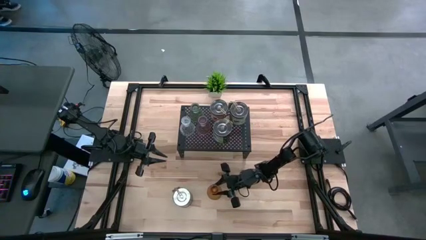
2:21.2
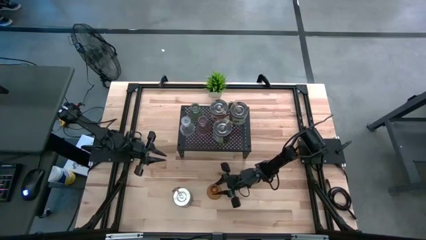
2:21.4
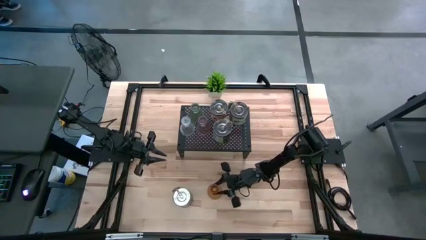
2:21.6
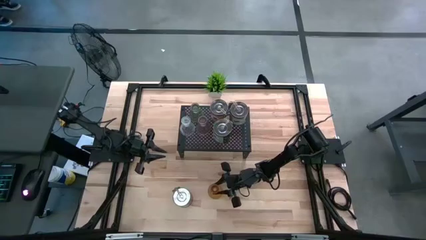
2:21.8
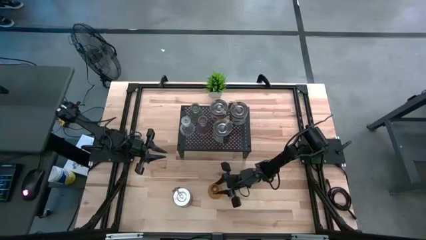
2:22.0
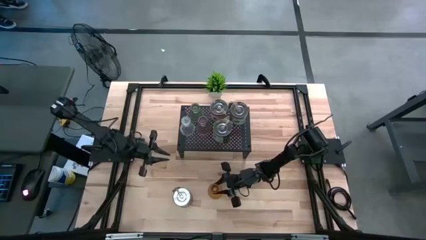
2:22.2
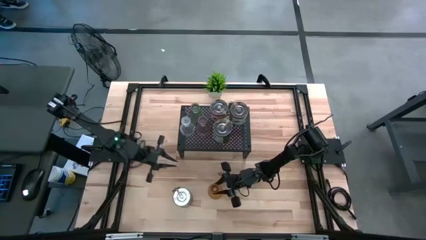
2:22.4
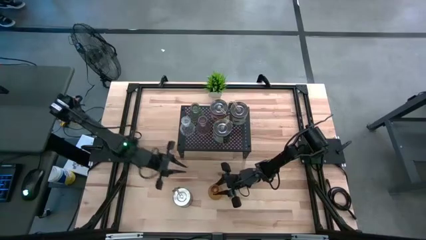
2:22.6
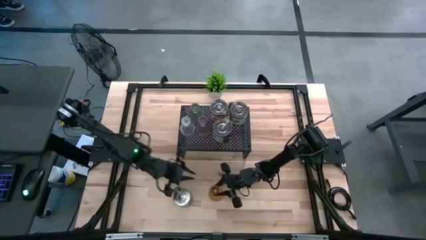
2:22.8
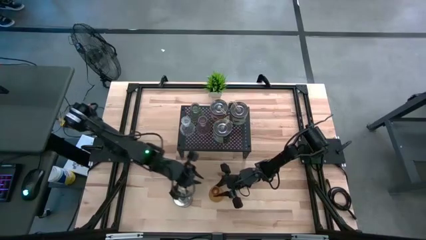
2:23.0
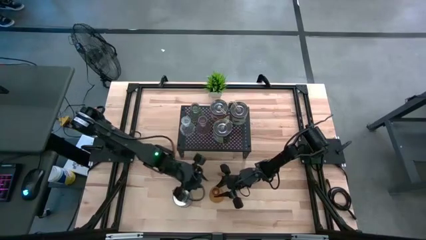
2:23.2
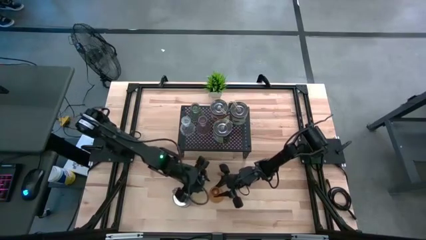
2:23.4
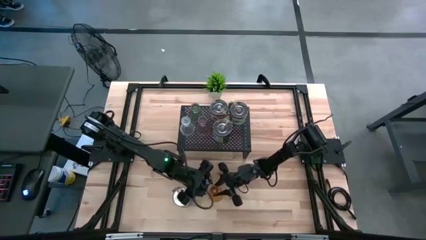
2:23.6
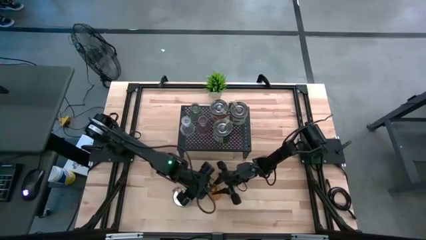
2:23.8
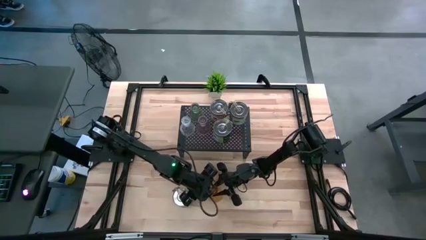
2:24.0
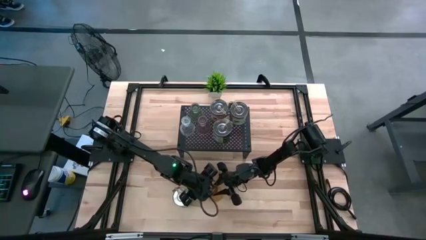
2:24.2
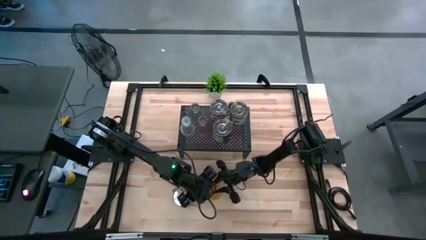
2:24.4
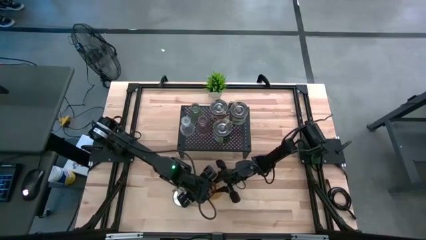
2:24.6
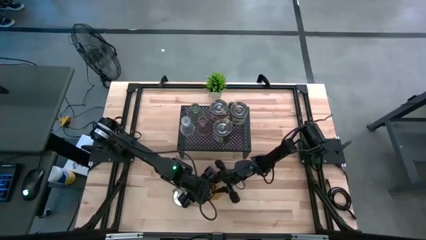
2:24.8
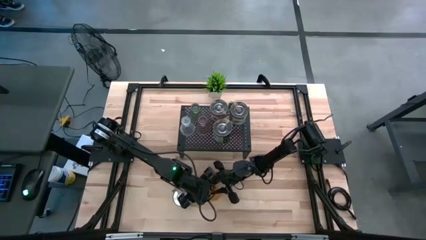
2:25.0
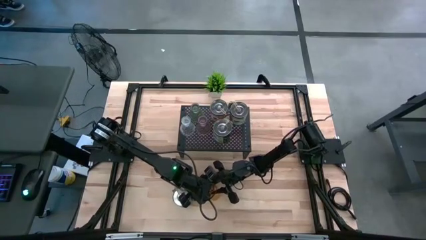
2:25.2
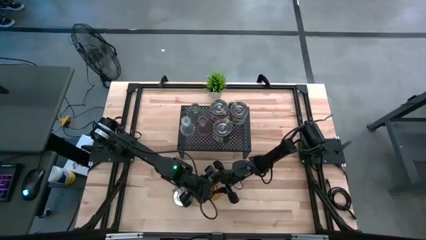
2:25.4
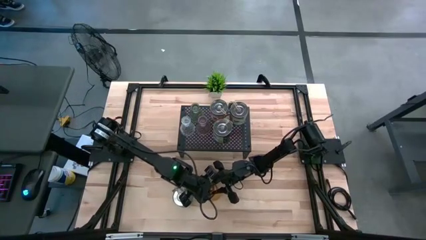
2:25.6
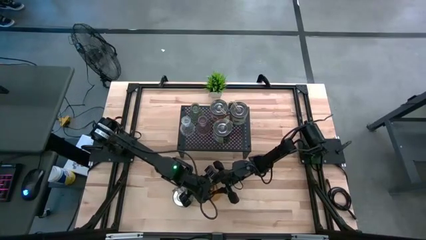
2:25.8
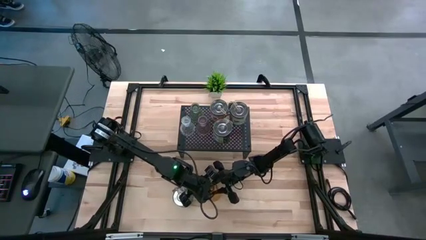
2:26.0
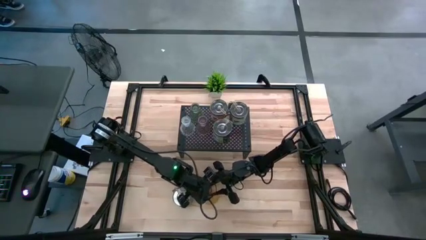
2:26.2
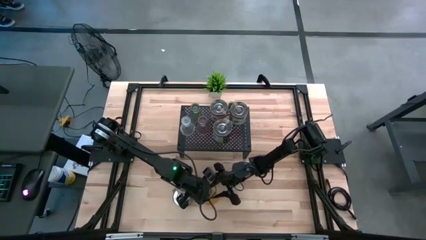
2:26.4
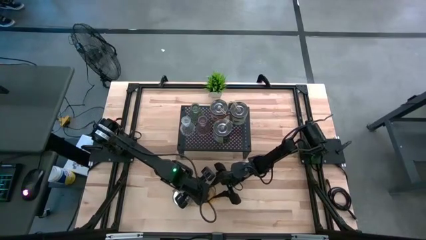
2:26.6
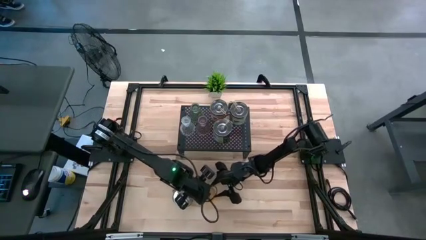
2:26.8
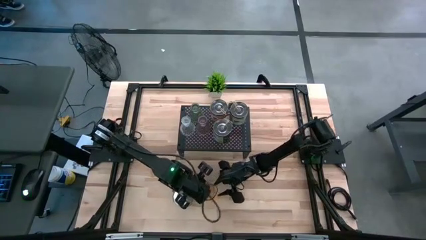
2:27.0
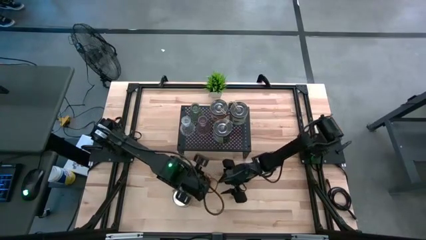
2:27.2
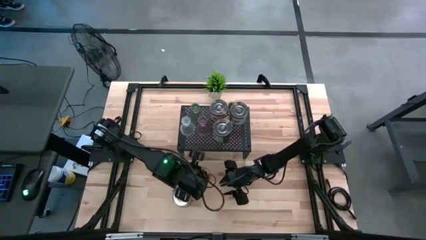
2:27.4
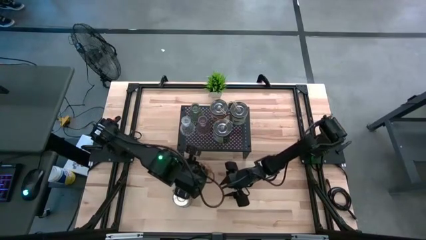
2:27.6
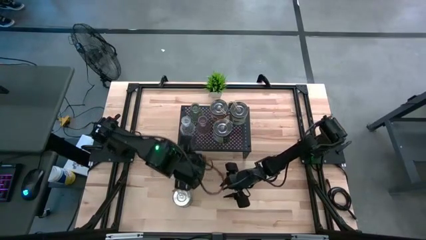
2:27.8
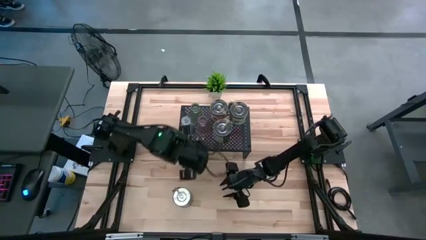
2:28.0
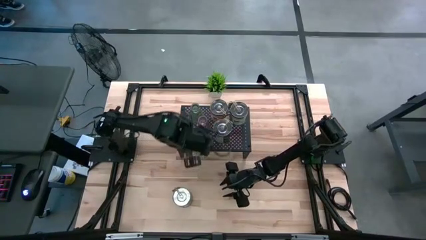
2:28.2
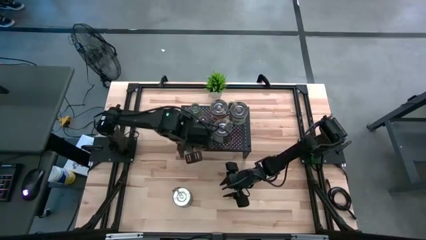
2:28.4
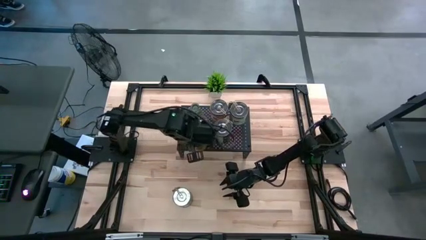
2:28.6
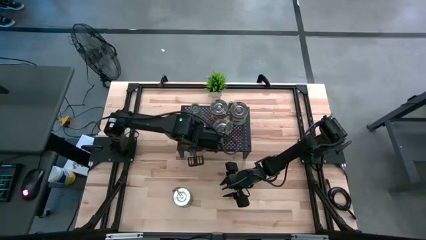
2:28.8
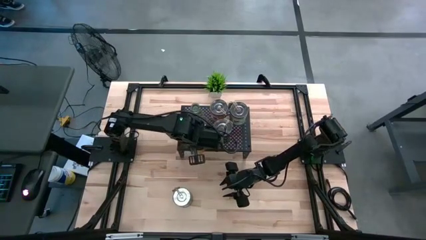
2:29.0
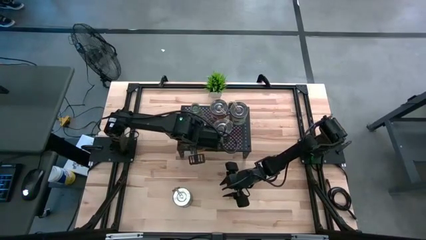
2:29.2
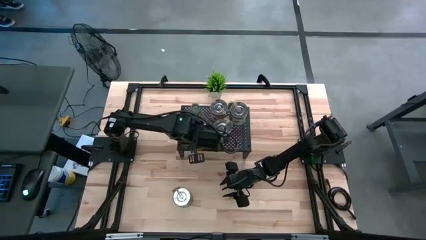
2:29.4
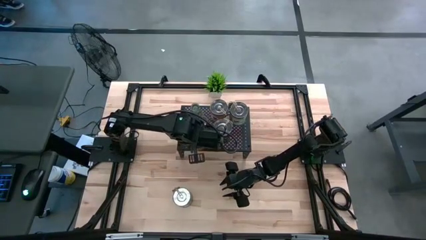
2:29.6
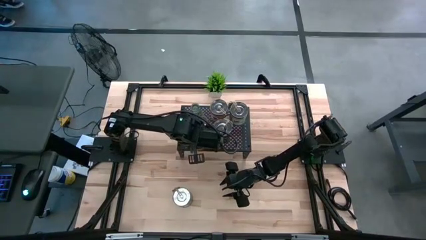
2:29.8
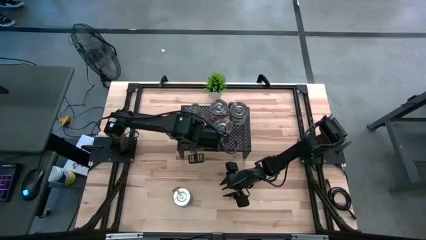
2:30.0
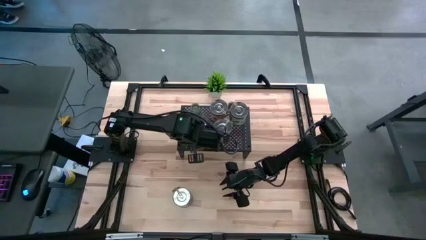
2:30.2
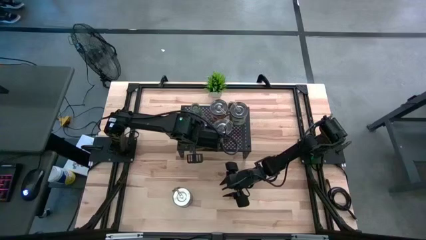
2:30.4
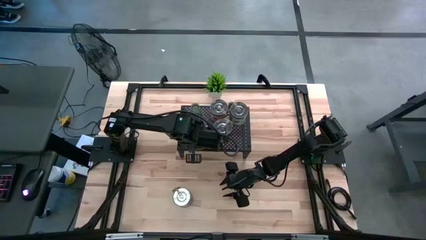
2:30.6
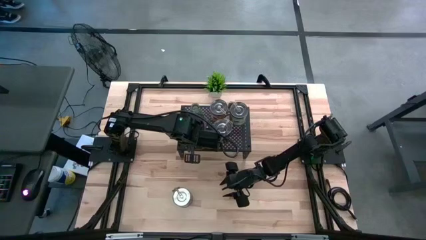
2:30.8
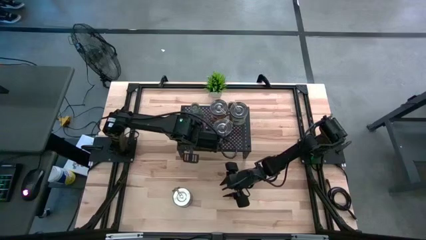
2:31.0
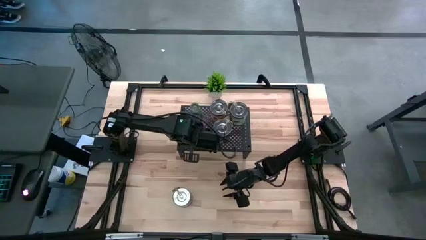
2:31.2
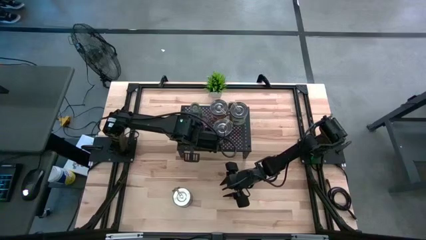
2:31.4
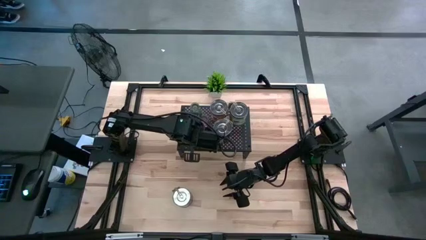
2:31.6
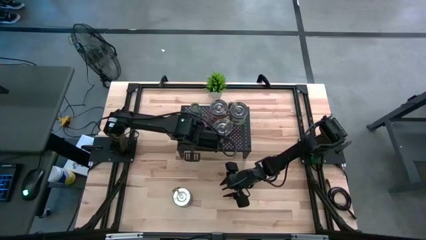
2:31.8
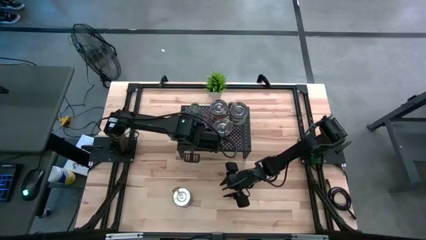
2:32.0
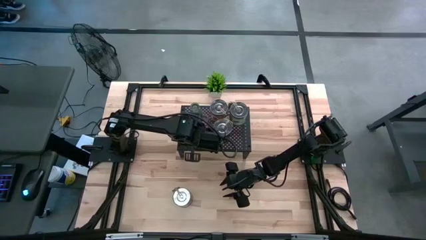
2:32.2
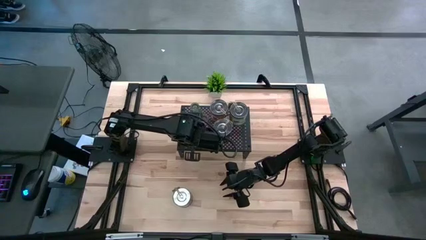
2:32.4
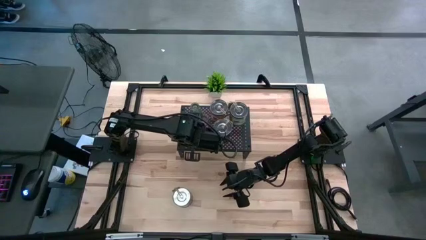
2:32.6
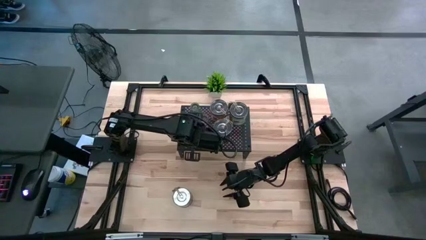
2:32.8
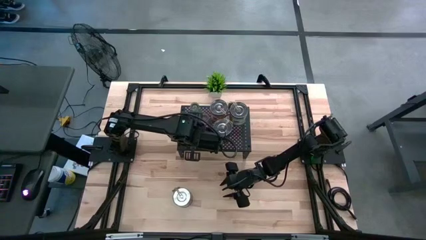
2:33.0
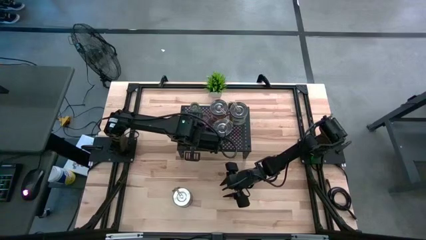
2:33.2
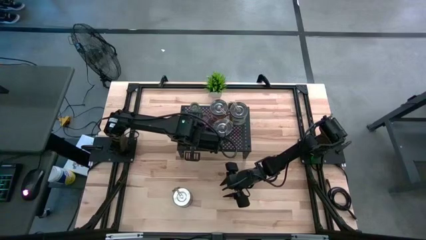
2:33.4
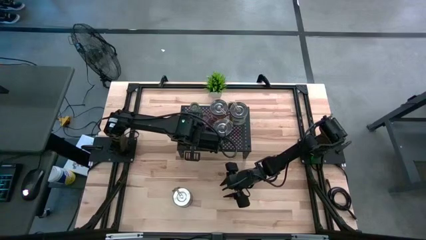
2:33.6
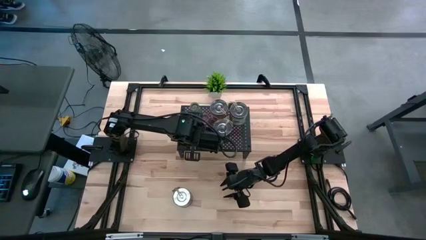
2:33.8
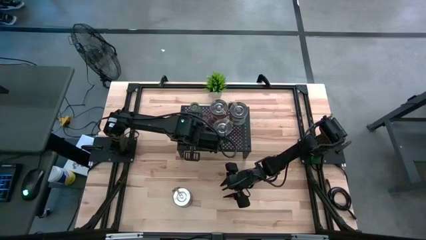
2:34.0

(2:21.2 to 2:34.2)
Task: Pick & Place candle stick holders
Put the yellow glass candle holder on the shelf

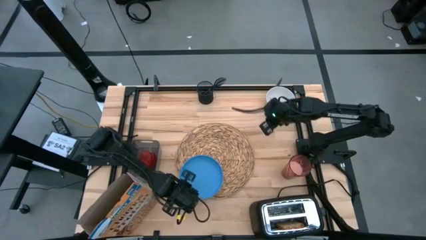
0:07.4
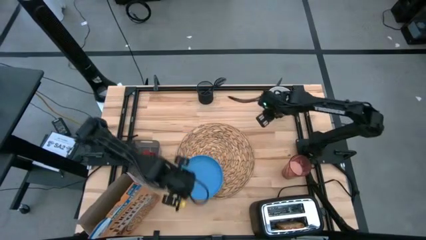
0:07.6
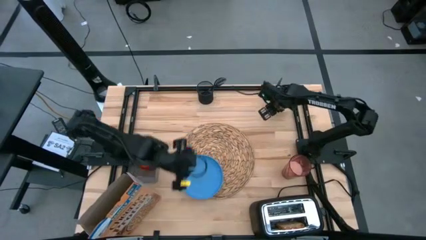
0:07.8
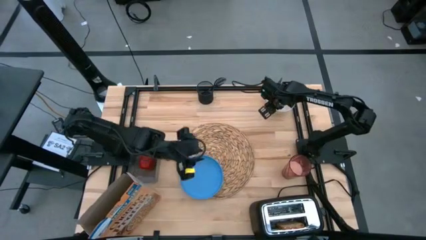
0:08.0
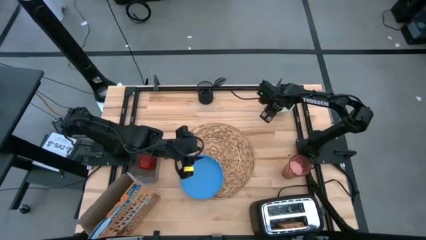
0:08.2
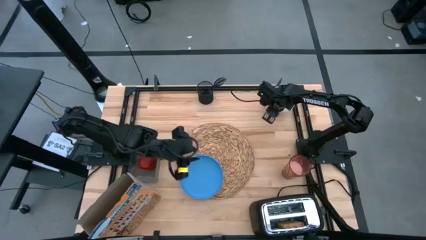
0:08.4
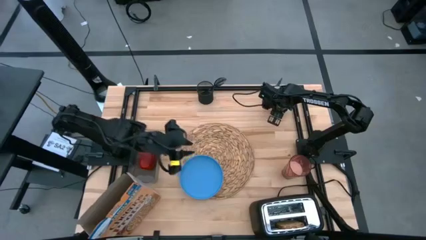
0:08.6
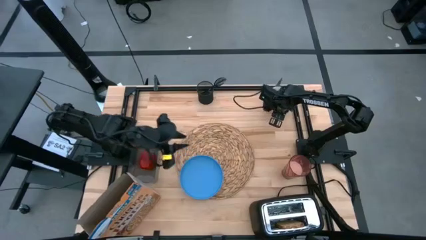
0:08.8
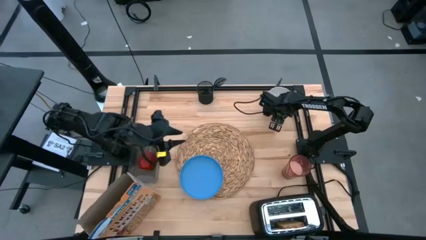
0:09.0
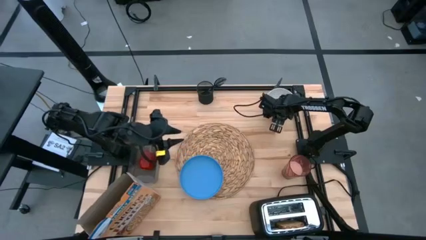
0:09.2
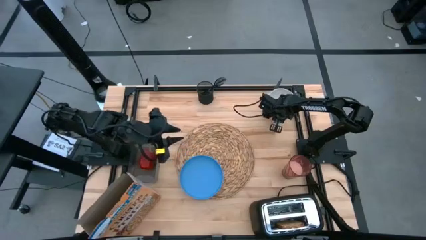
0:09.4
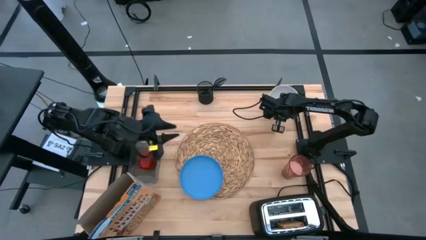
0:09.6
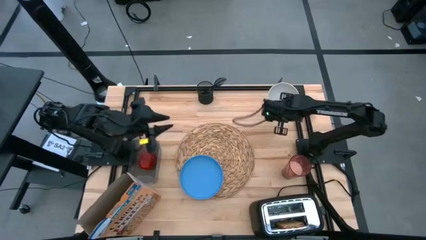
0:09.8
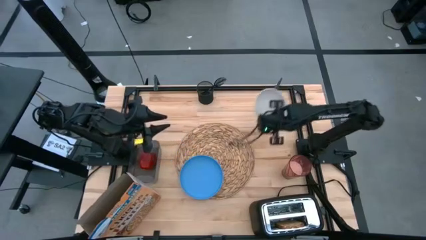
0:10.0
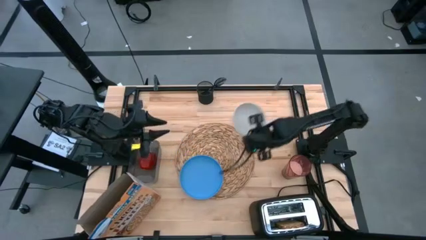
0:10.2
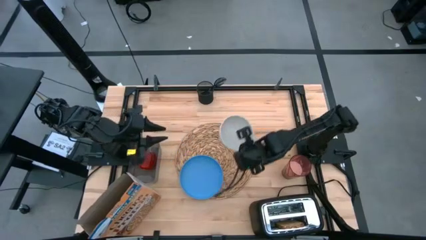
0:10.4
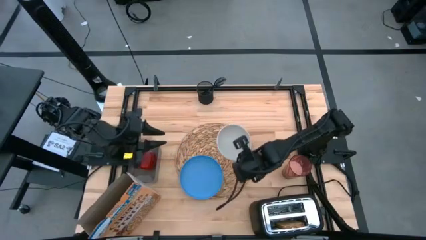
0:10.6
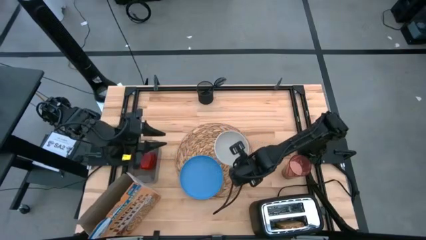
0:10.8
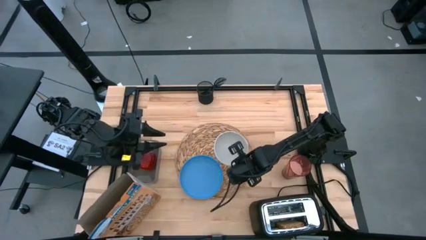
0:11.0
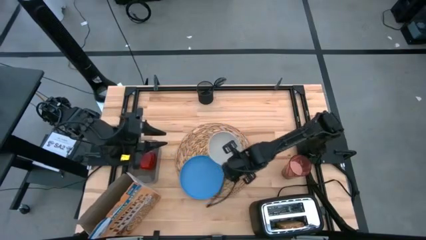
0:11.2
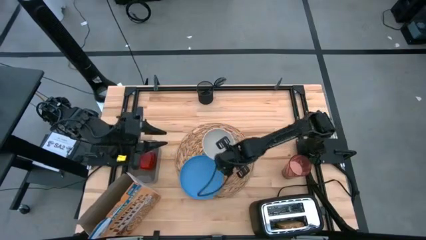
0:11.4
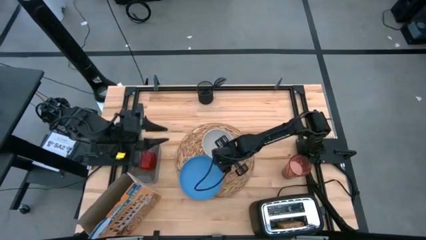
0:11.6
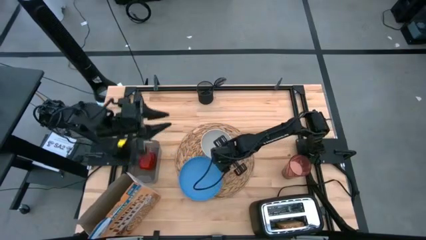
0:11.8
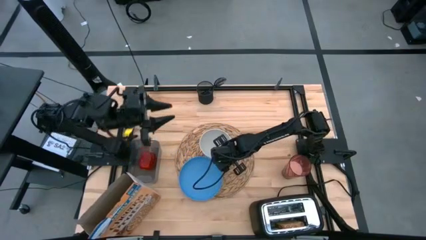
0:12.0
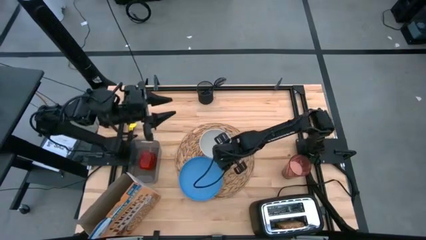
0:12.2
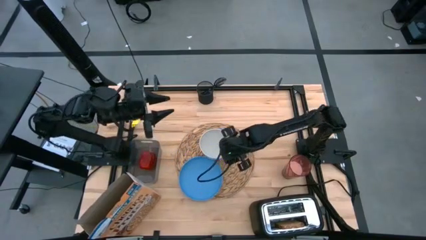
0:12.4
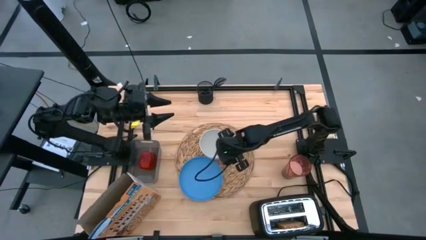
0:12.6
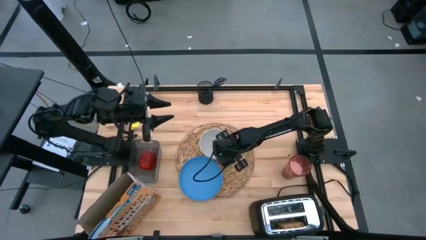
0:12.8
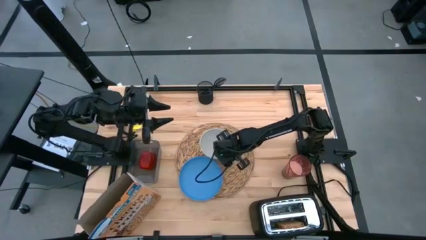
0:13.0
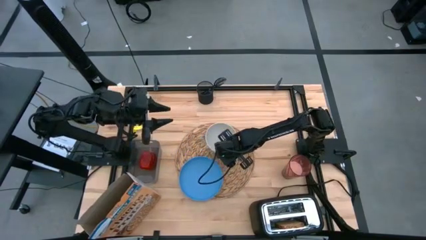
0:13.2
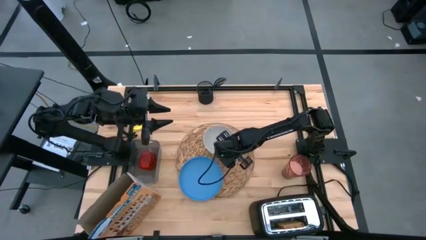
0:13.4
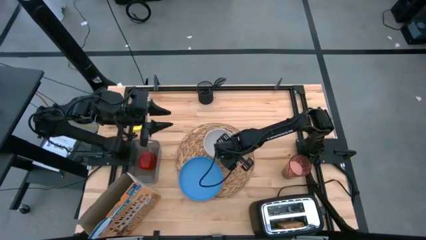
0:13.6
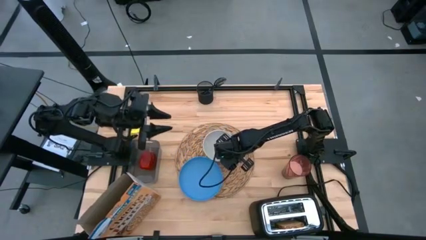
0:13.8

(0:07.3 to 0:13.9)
Task: Arrange a breakfast setting
Put the white bowl on the brown placemat at the top of the blue plate
